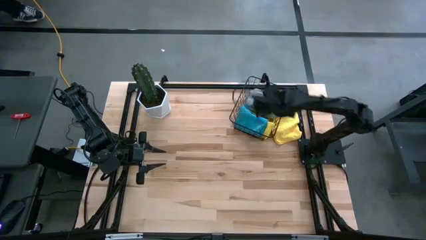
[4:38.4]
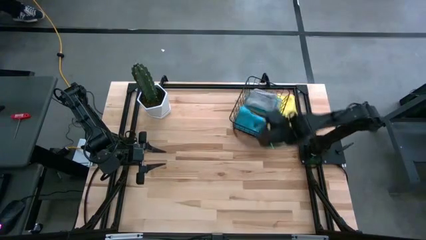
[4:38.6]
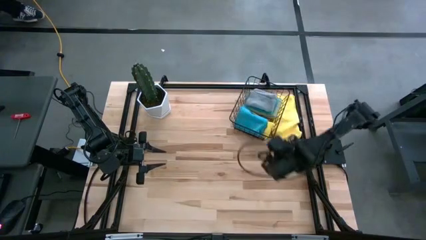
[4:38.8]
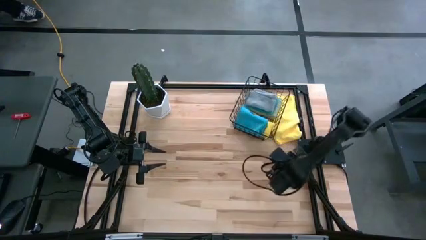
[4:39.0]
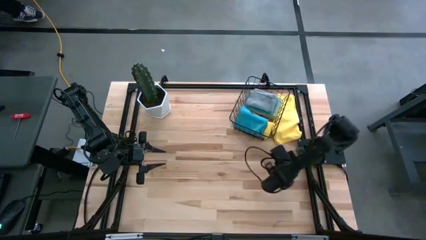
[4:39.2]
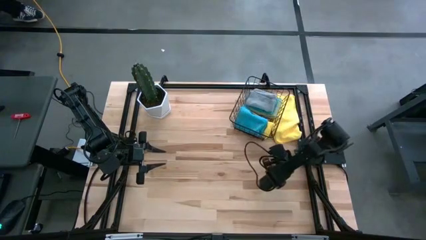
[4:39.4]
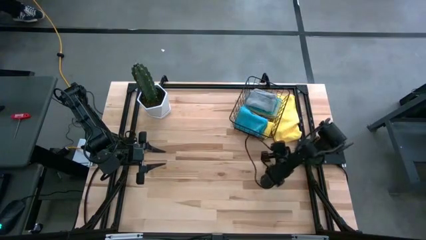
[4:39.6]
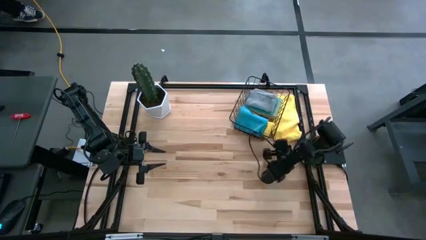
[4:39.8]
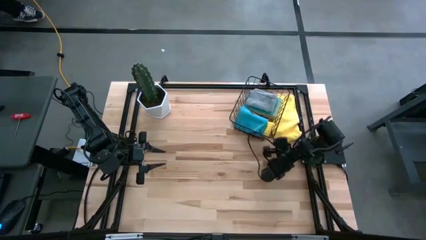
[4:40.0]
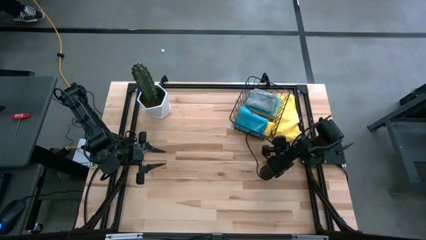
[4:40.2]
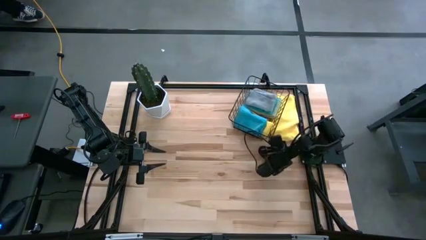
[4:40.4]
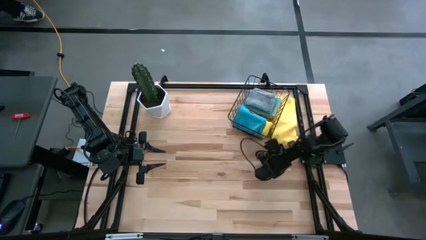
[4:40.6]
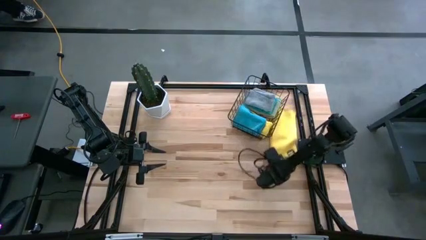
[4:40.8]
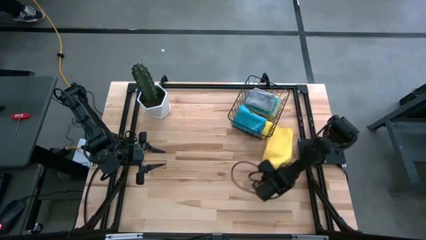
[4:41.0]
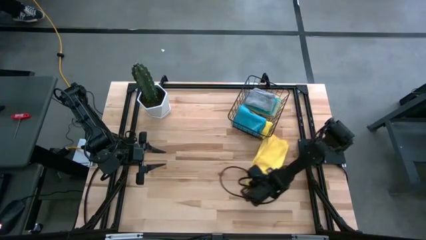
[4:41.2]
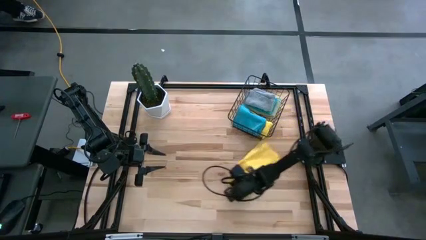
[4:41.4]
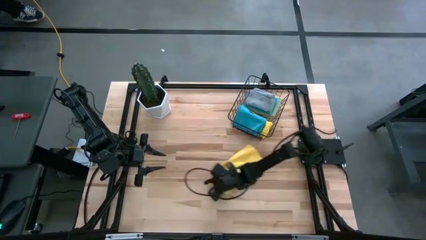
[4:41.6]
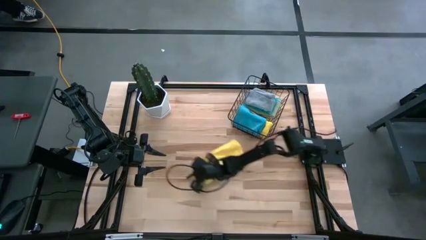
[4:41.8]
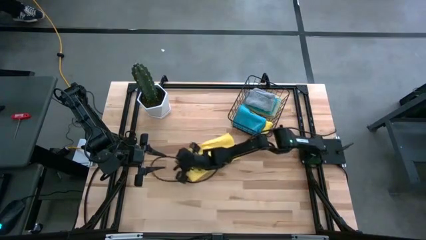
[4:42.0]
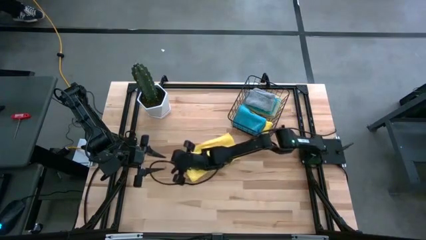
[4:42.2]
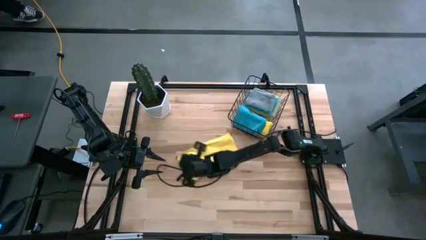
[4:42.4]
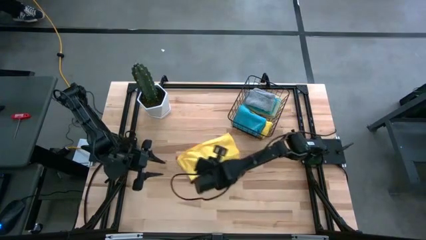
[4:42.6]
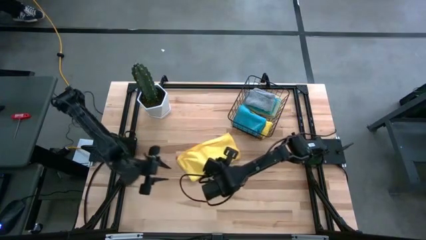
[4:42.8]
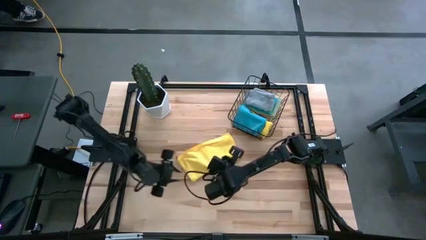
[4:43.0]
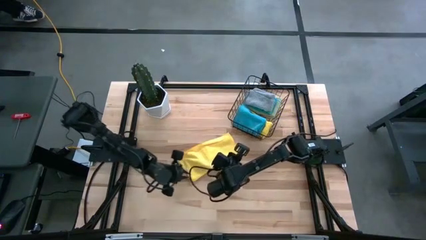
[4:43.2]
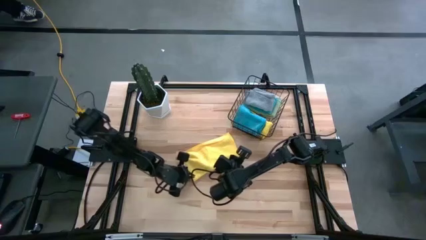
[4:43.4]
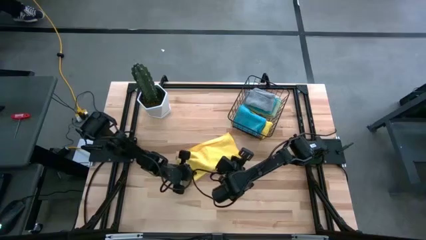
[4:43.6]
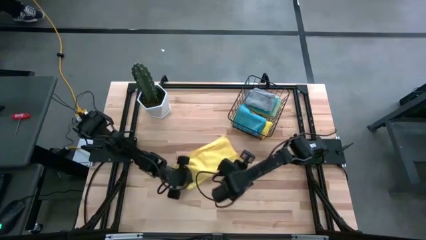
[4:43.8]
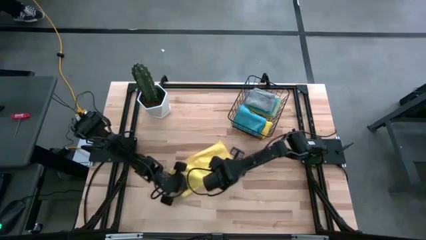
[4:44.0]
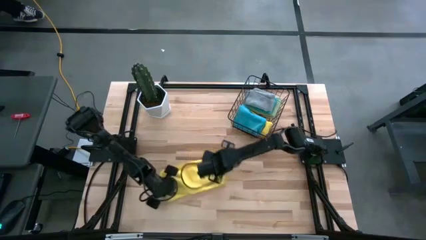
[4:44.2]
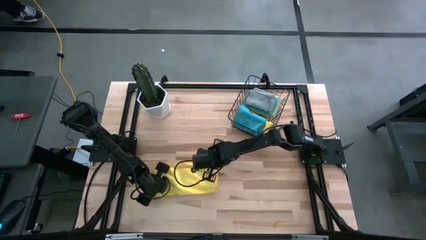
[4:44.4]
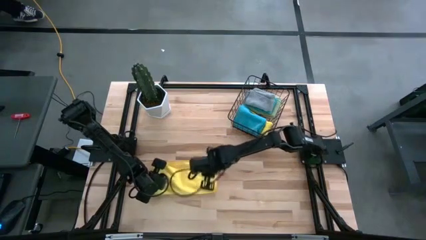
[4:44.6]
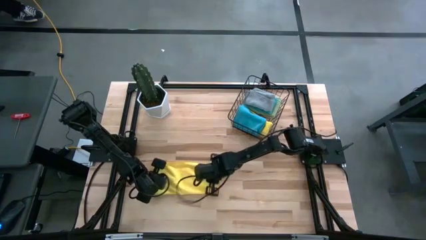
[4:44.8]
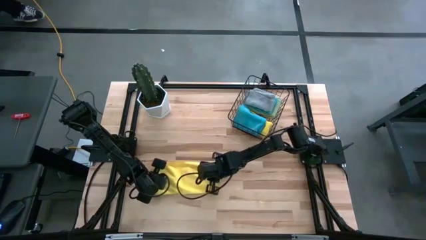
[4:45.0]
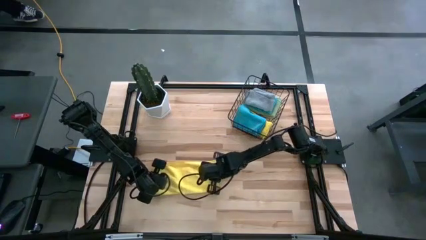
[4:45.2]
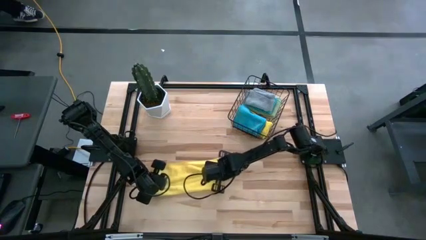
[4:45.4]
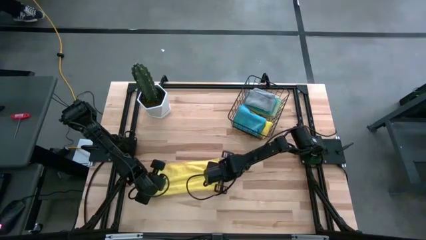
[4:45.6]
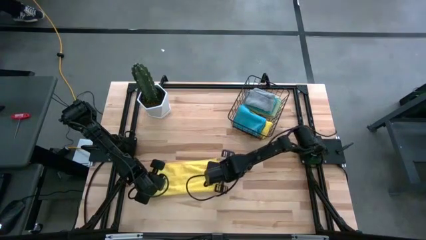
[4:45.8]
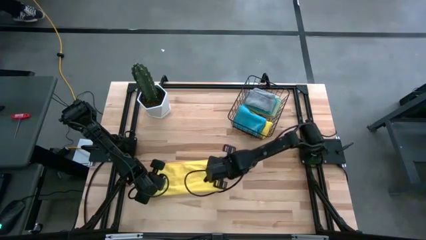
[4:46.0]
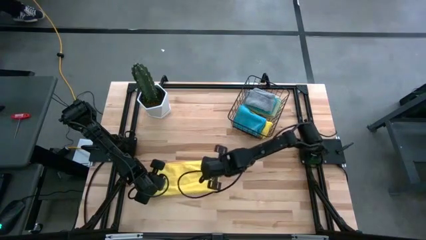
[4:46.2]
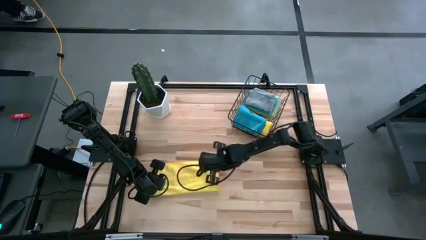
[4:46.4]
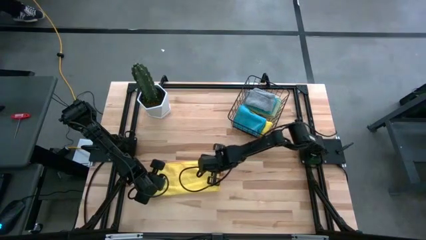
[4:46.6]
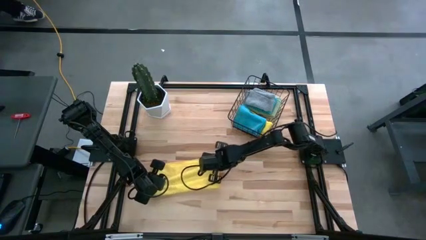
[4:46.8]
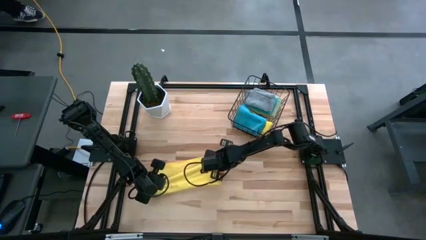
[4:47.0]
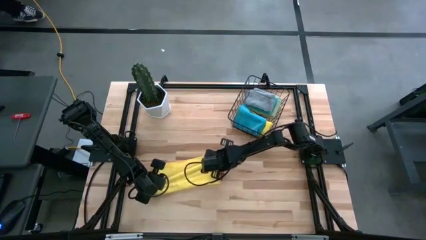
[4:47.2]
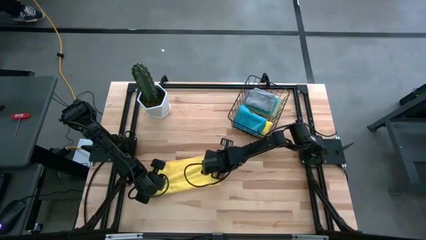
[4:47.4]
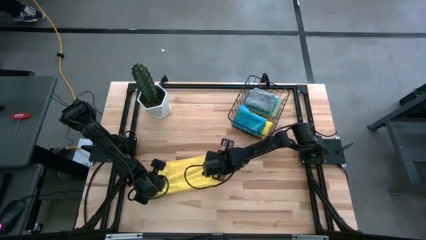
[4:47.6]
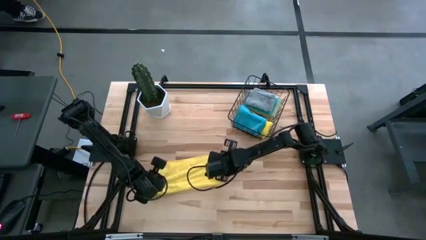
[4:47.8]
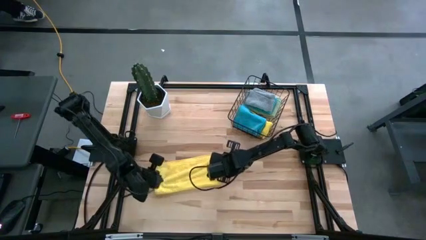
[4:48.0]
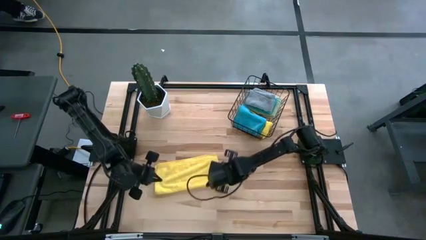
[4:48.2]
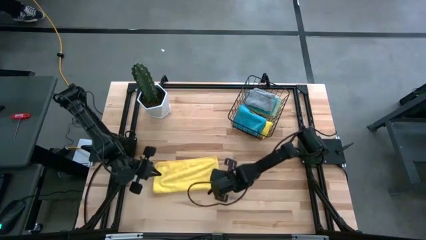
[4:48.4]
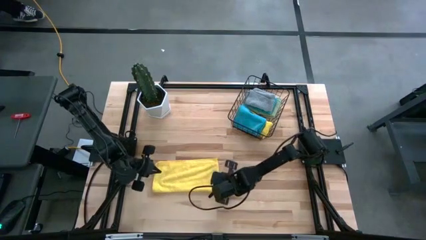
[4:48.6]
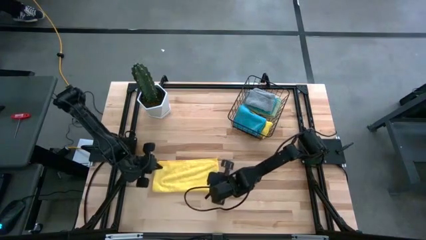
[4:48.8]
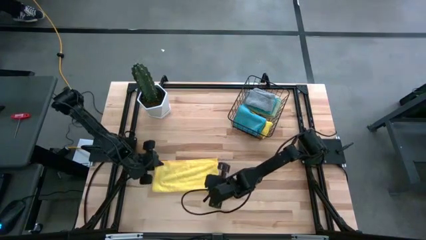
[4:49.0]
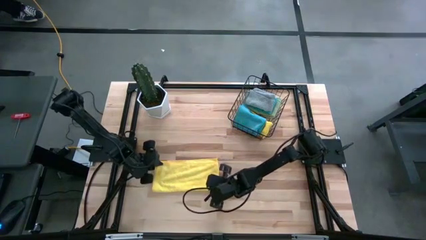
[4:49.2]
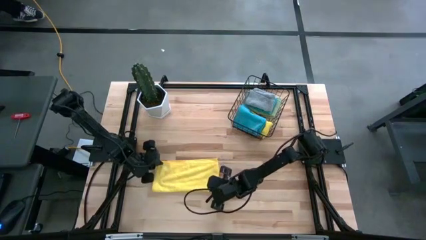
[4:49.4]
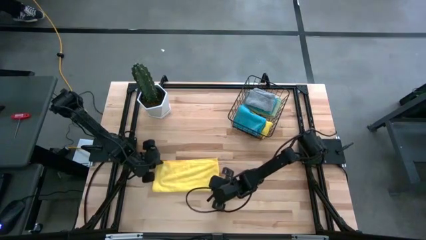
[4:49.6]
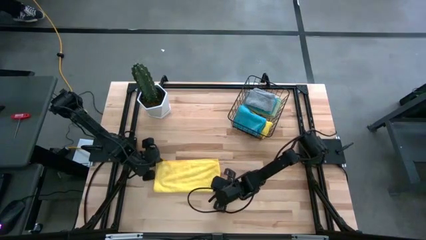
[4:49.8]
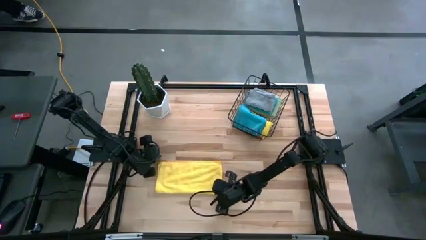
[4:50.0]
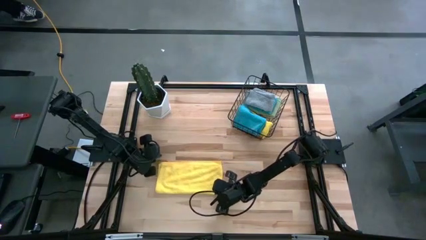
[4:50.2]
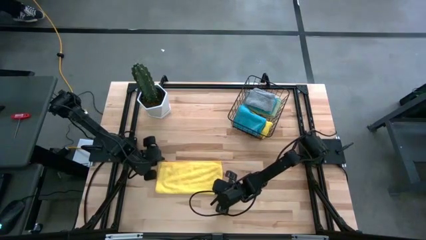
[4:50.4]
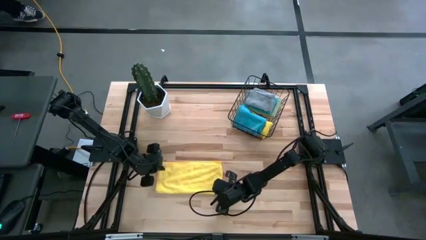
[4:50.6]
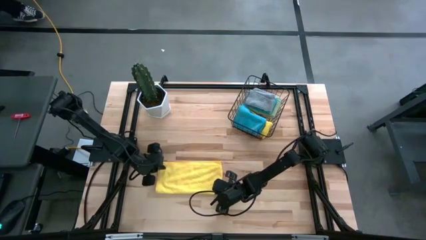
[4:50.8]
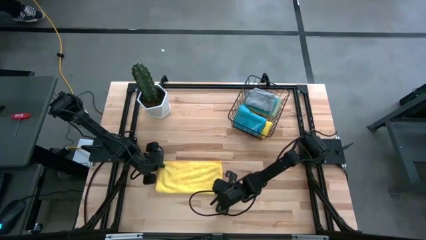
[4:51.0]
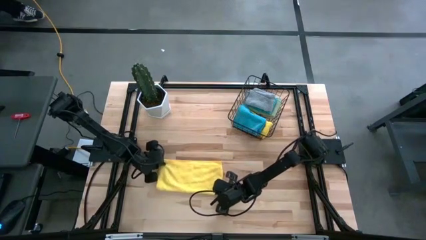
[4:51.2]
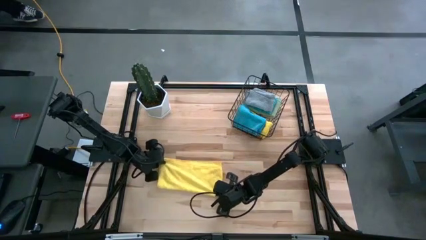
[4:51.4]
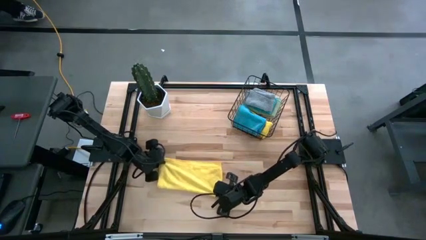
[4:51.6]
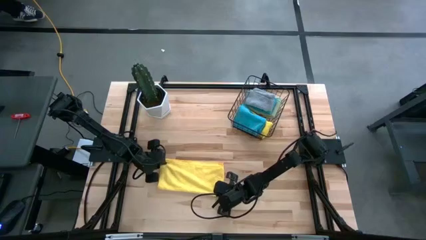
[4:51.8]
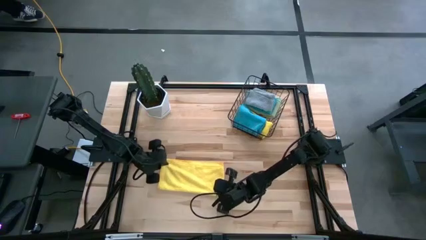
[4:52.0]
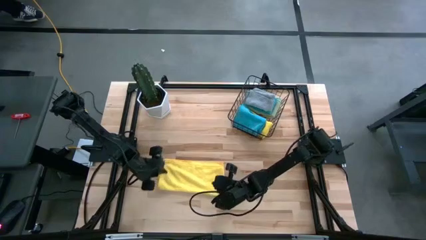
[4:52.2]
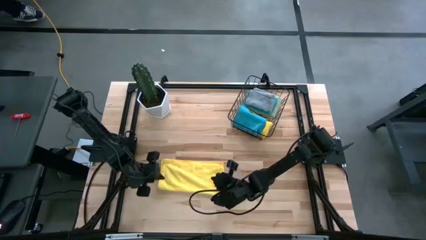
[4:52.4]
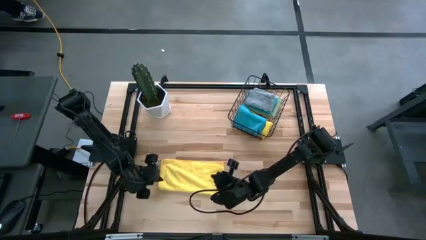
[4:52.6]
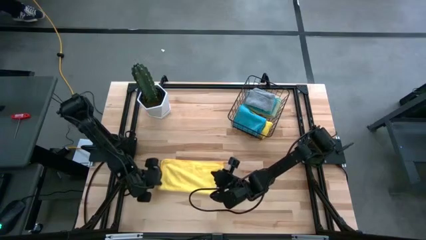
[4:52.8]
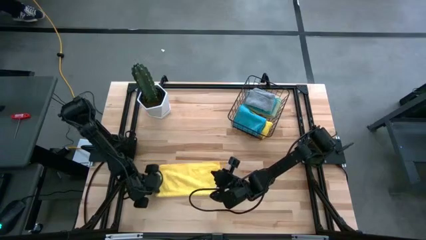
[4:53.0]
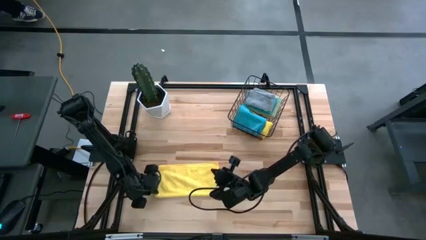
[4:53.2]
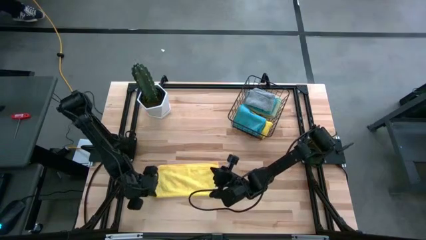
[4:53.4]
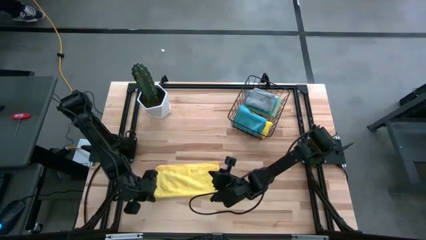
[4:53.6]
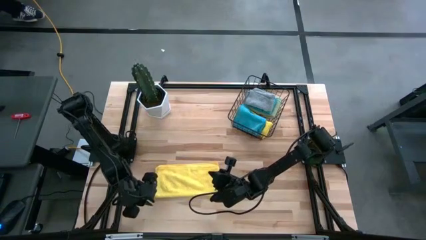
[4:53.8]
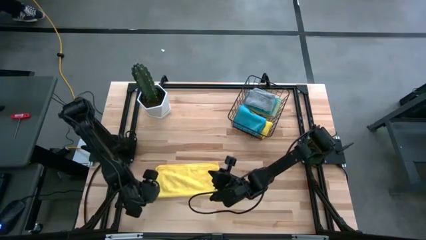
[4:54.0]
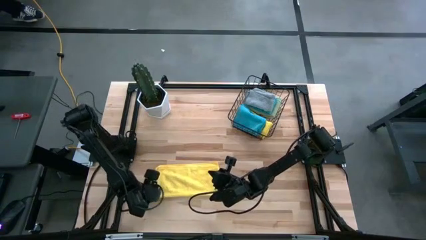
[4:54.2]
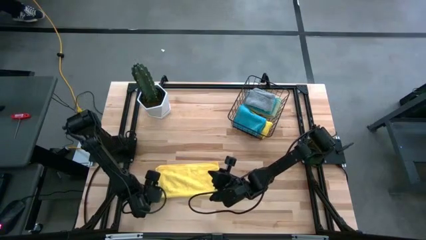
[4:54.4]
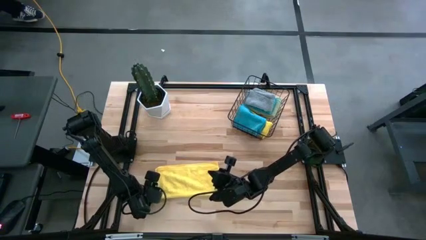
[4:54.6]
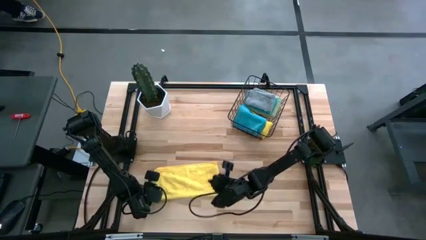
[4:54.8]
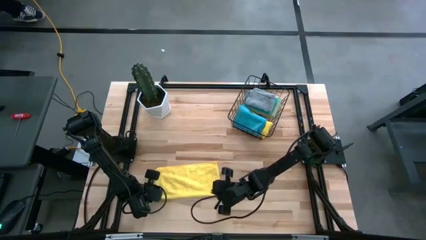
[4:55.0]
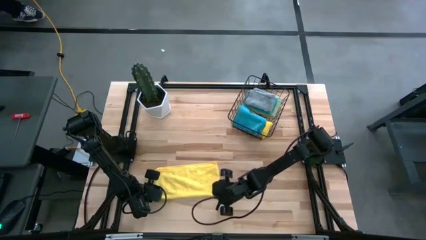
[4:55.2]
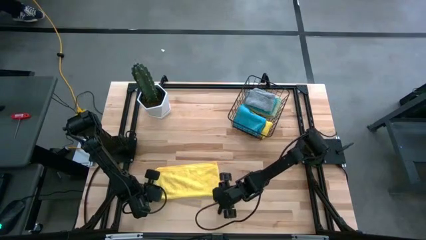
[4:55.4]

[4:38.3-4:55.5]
Task: Fold microfiber towels
Fold the yellow microfiber towel
